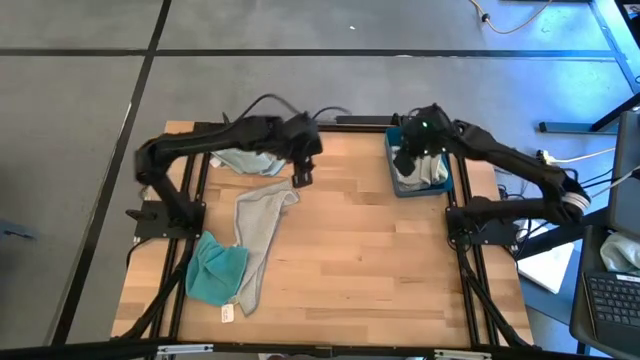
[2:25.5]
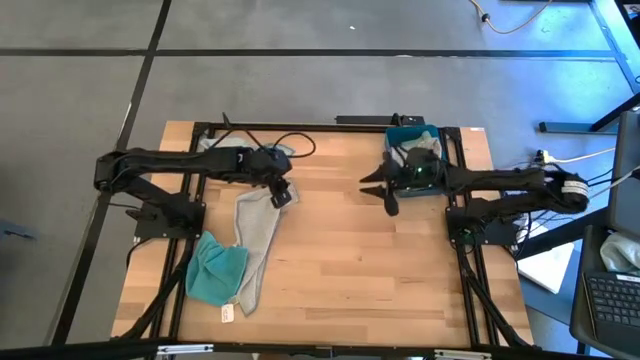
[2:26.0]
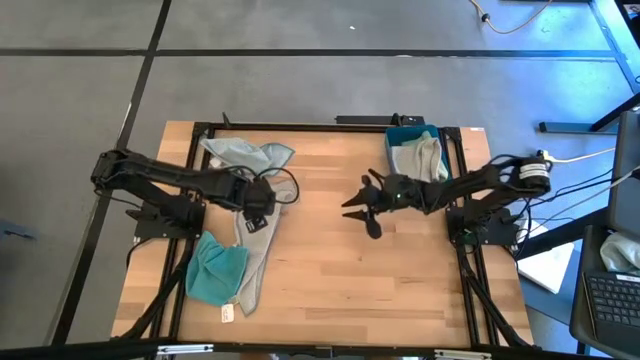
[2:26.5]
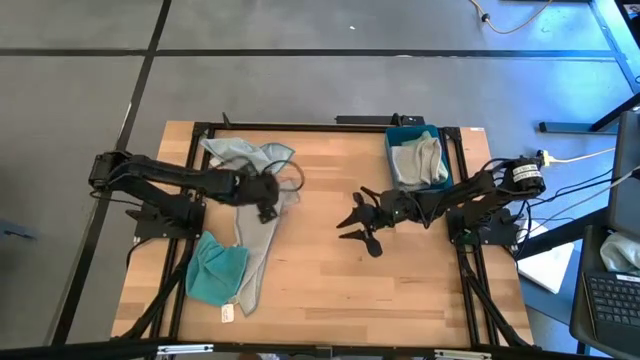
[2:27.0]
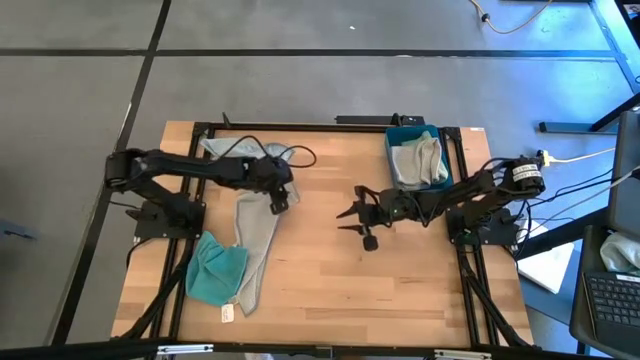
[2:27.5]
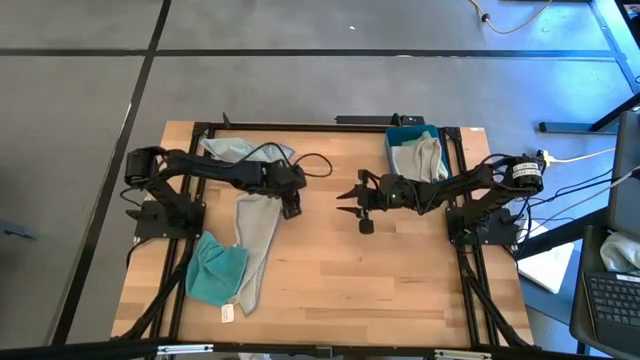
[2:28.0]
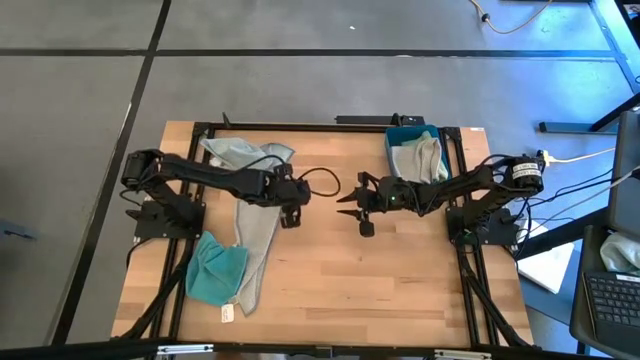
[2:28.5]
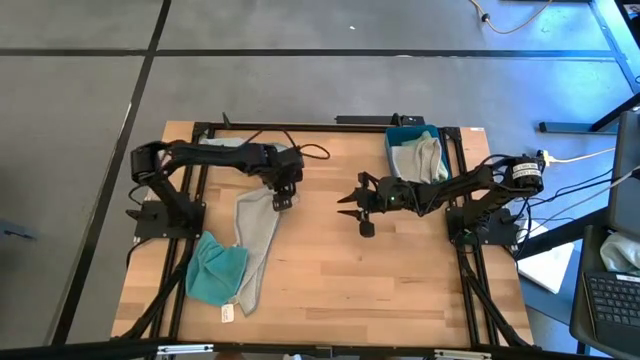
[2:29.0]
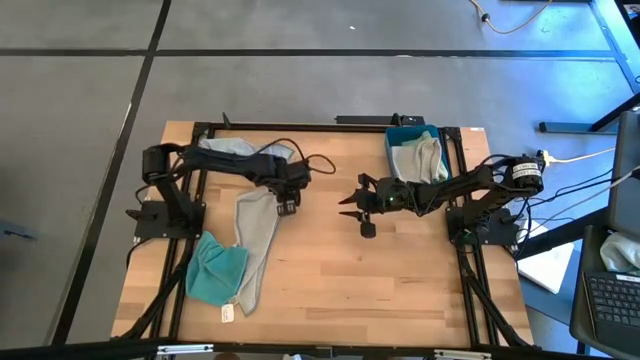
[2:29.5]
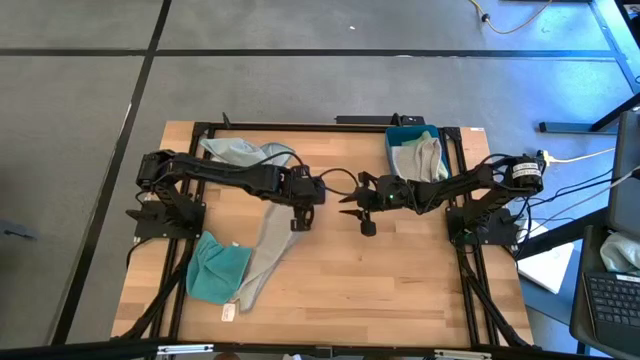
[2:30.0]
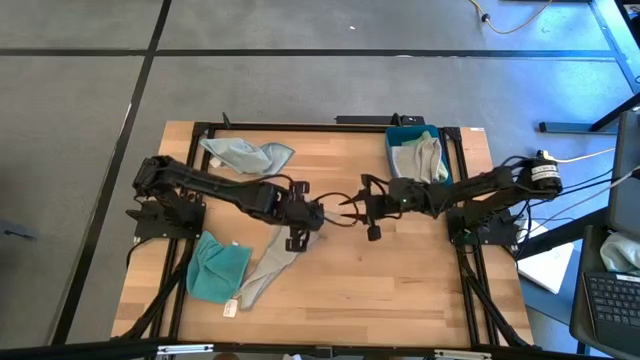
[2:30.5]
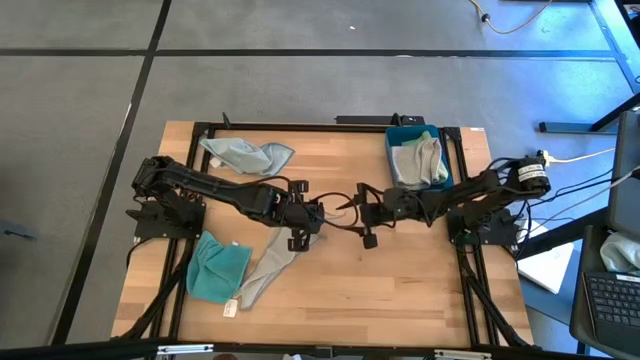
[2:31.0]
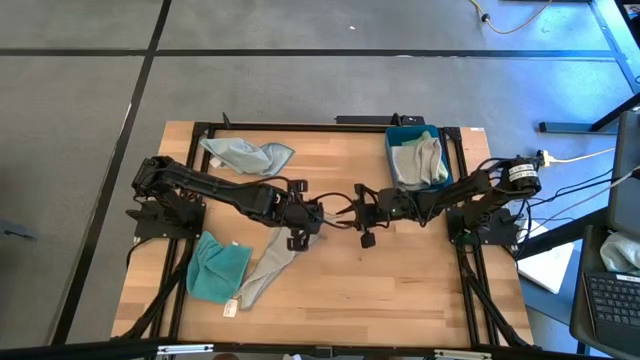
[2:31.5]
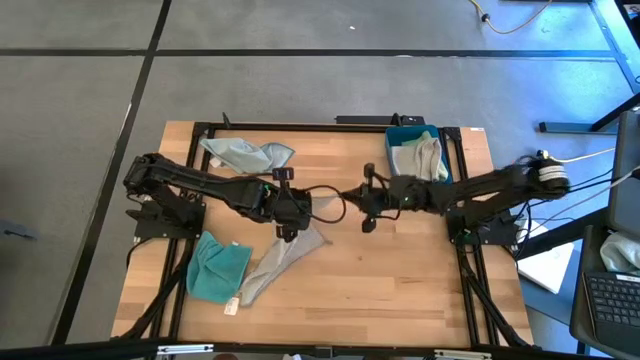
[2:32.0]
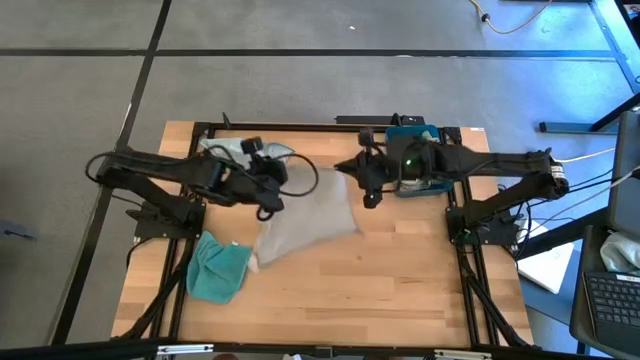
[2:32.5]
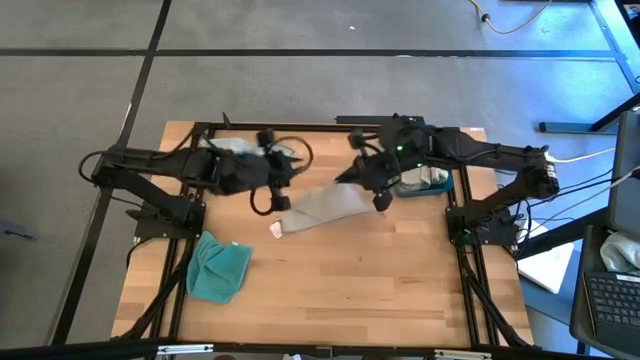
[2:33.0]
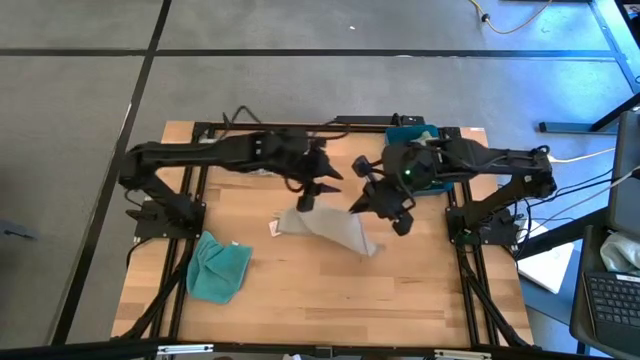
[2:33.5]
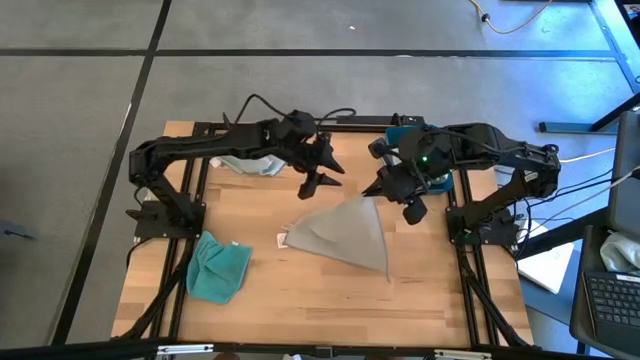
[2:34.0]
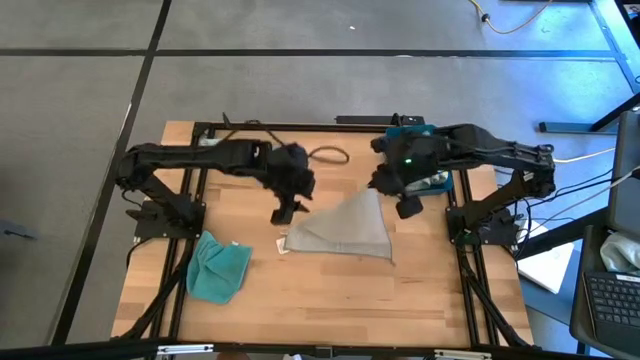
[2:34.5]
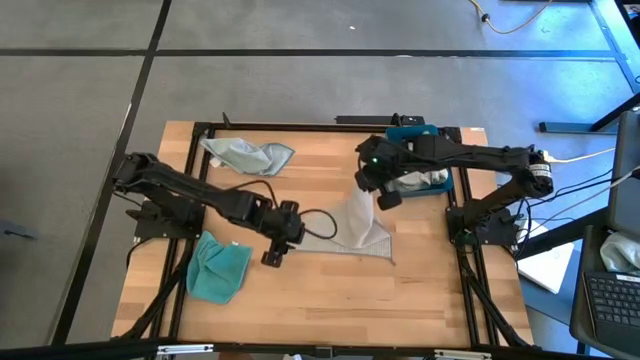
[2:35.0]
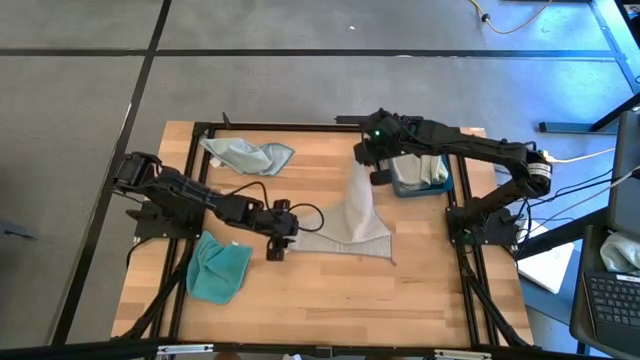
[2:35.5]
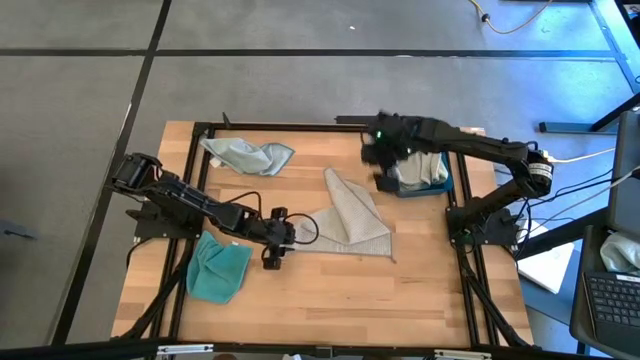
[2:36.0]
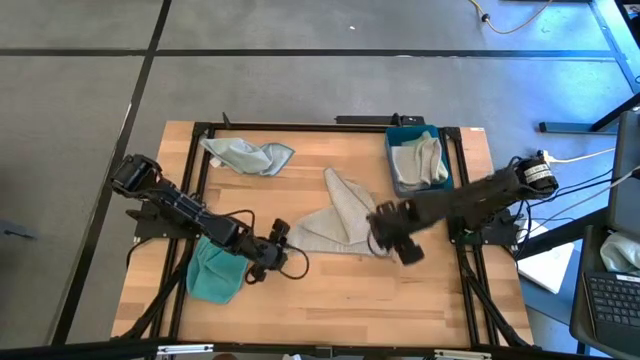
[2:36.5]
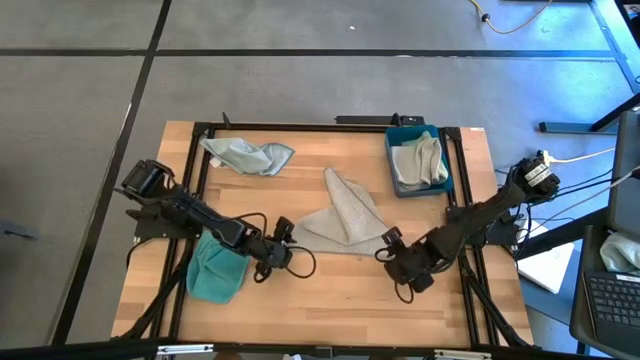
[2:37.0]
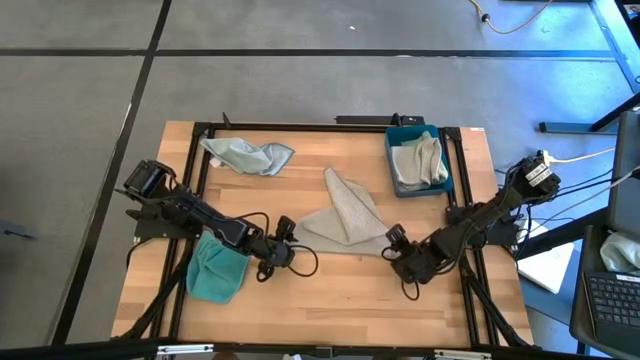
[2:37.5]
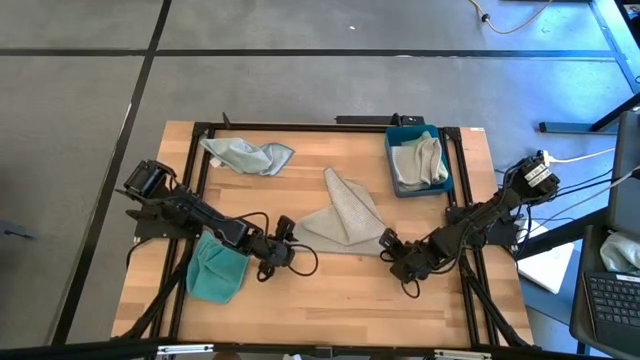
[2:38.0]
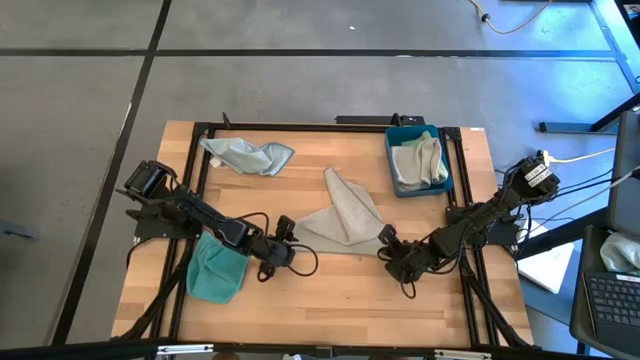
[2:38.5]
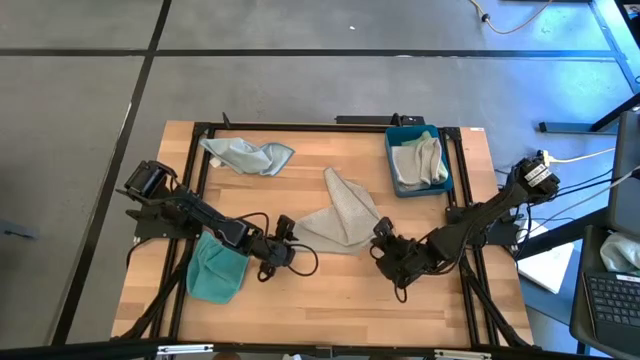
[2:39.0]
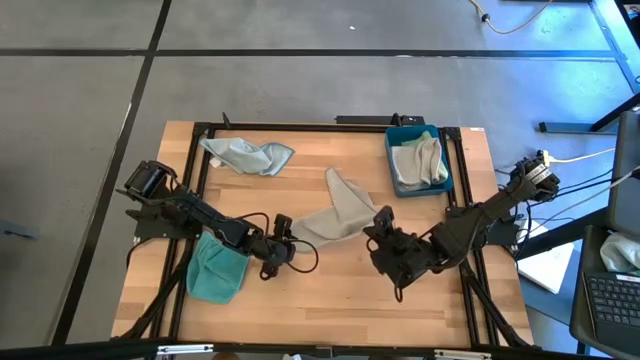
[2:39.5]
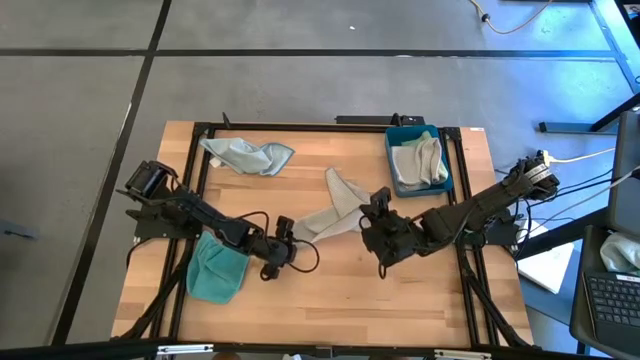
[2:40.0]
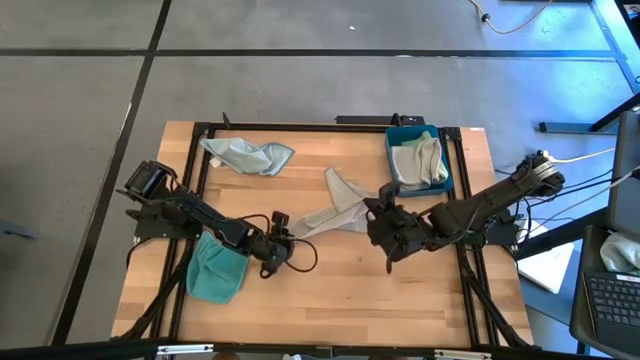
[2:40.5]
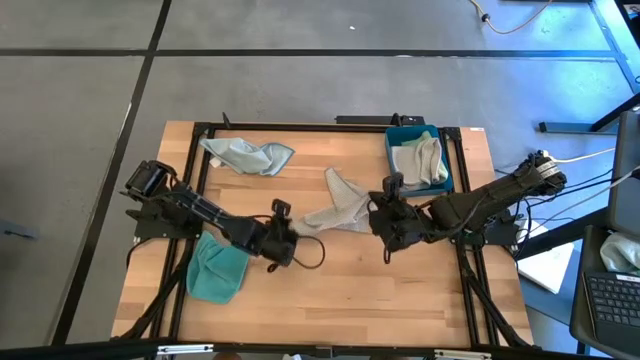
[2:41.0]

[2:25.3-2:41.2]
Task: Fold microfiber towels
Fold the grey microfiber cloth

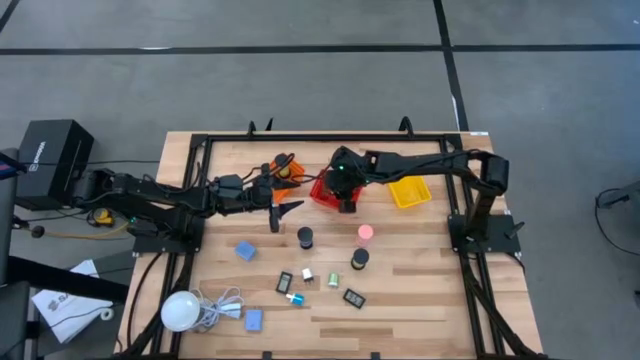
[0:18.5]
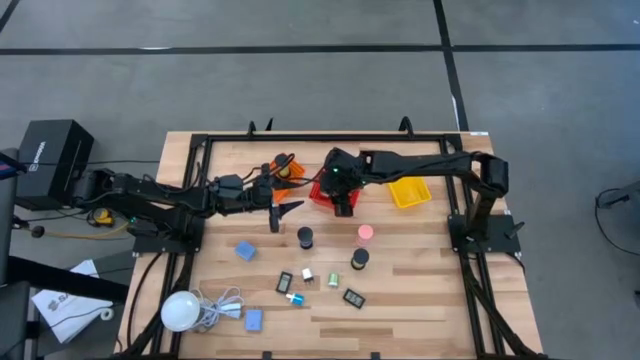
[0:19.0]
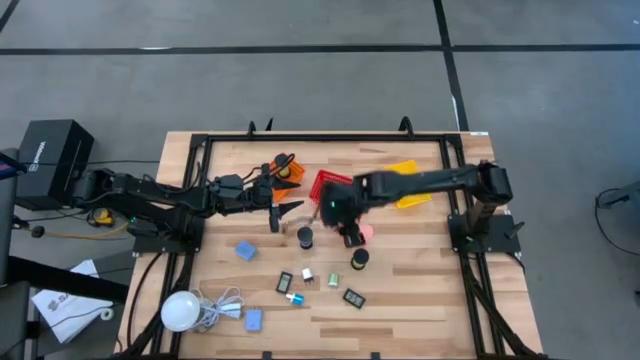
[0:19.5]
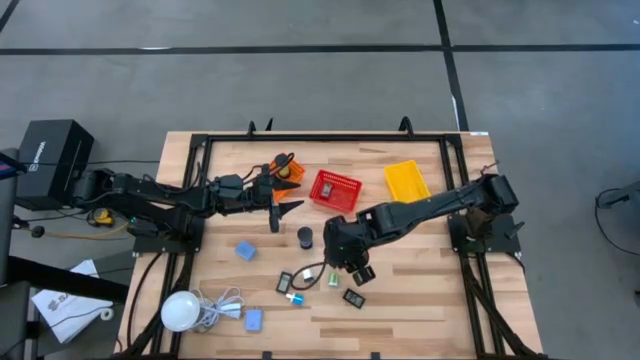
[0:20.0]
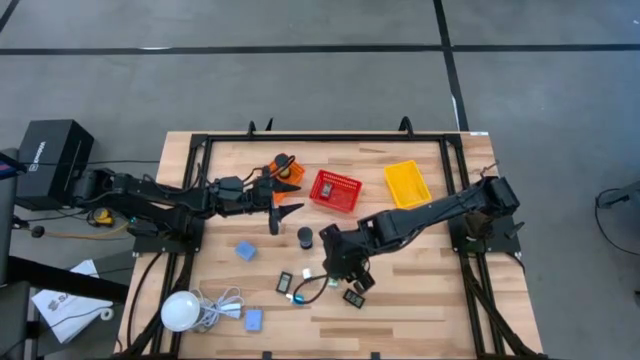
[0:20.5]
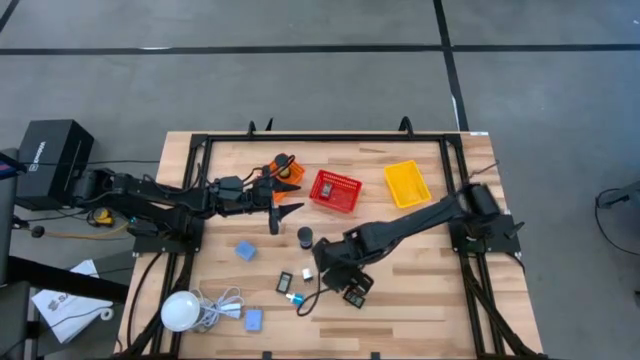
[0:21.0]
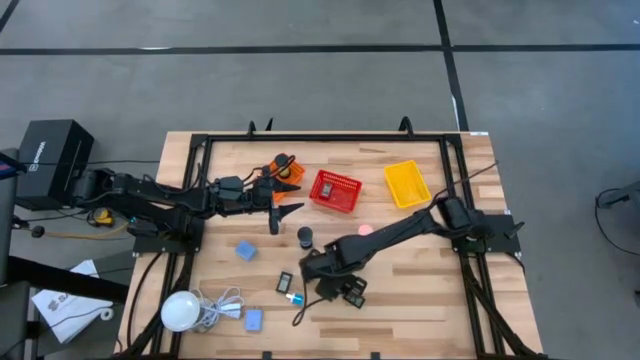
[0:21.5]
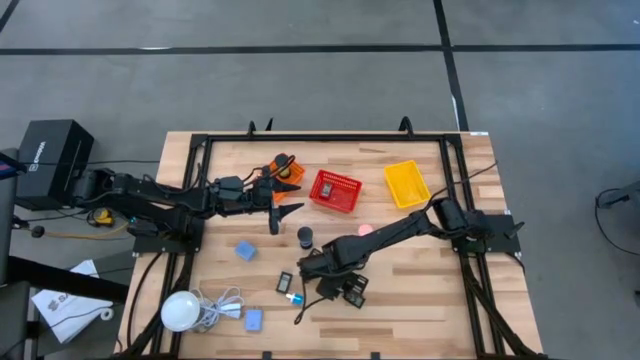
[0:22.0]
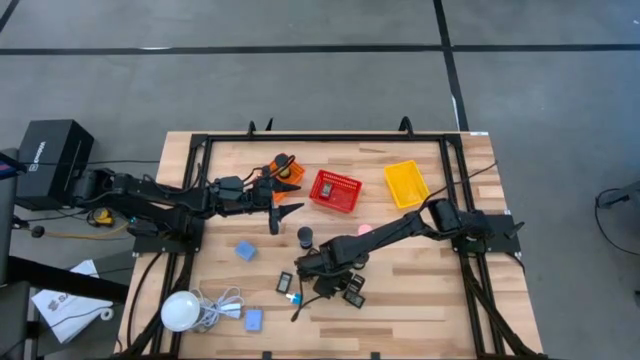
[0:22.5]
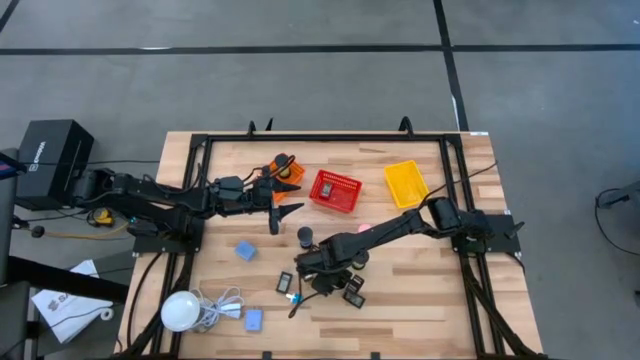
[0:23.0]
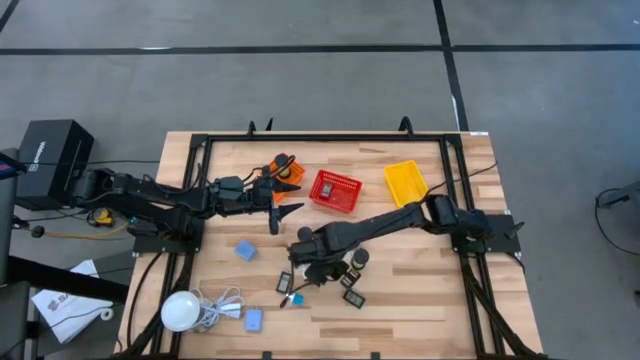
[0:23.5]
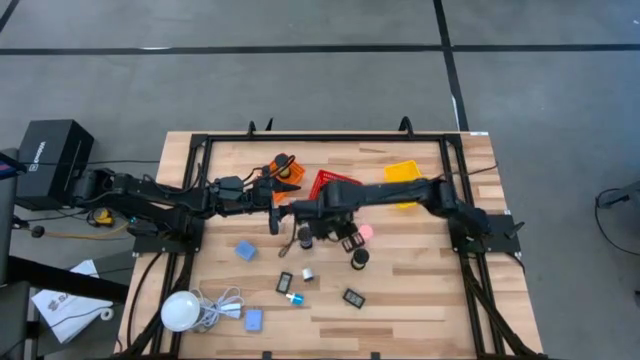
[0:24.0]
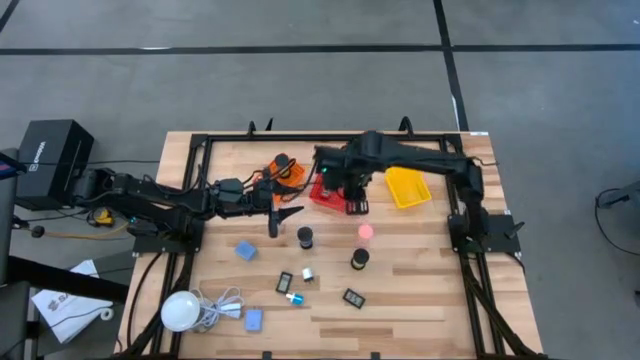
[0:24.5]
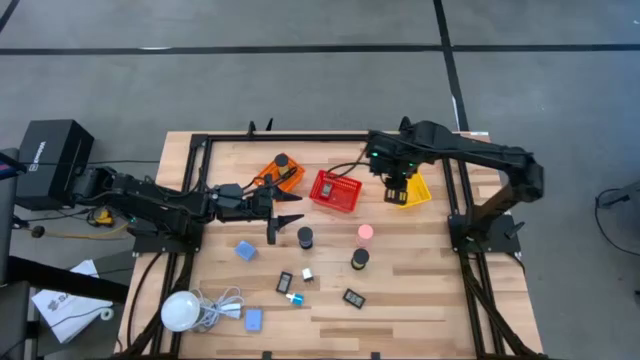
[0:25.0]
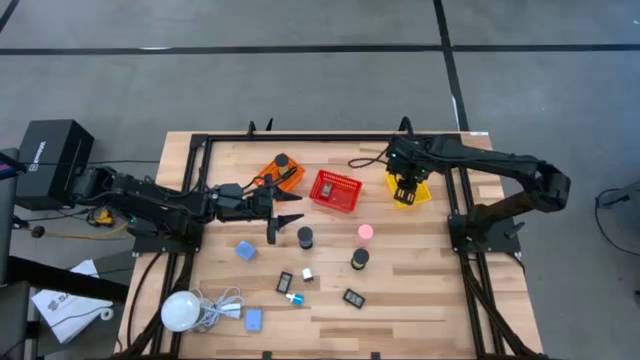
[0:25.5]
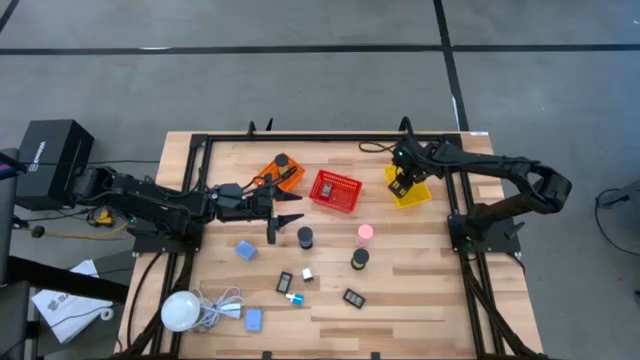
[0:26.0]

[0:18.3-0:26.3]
Task: Pick & Place Office items
Put the green charger adapter into the yellow bin
